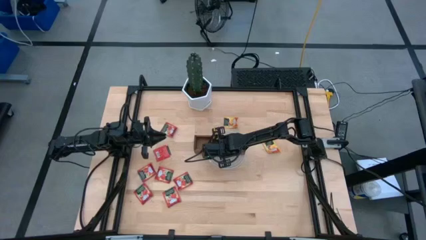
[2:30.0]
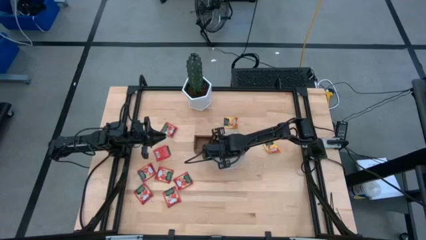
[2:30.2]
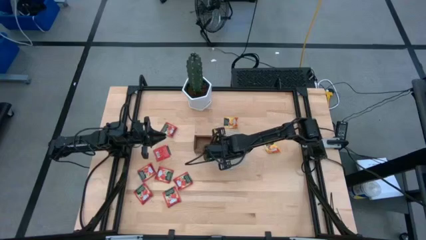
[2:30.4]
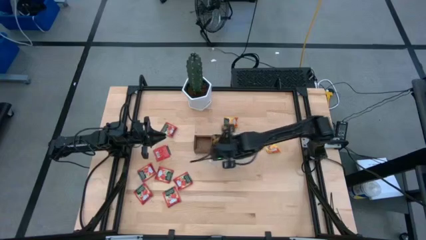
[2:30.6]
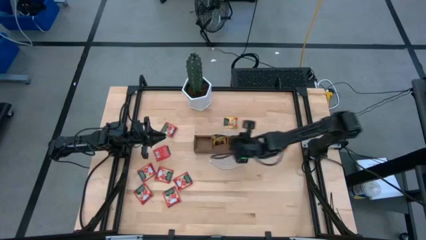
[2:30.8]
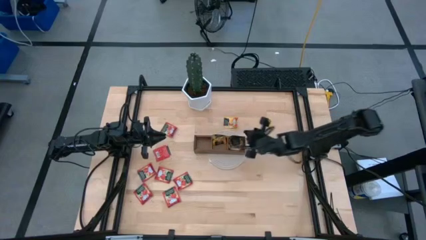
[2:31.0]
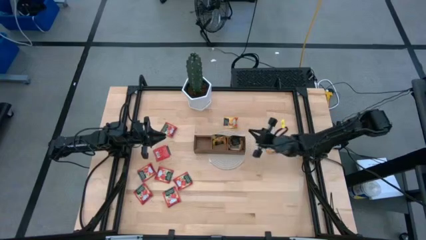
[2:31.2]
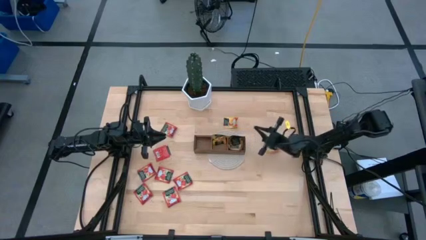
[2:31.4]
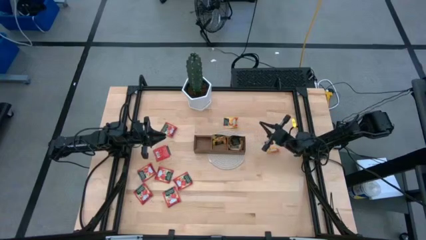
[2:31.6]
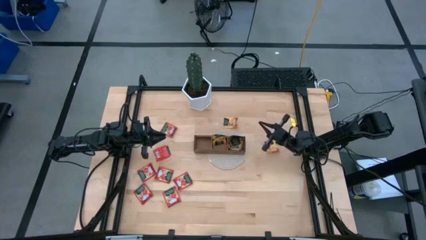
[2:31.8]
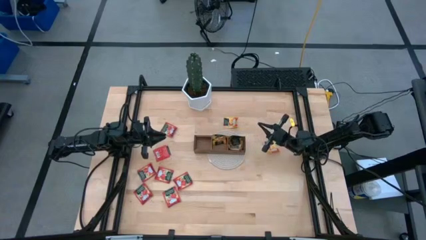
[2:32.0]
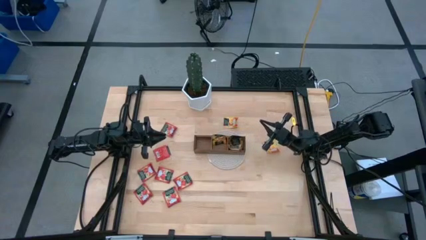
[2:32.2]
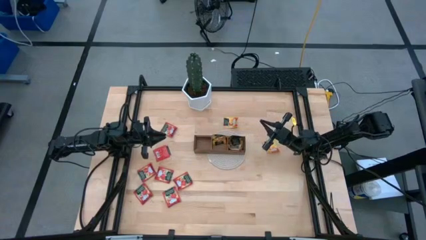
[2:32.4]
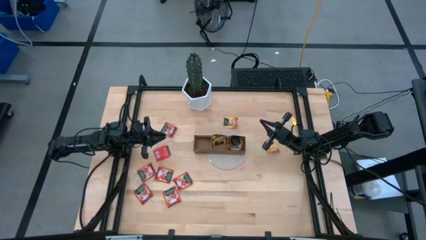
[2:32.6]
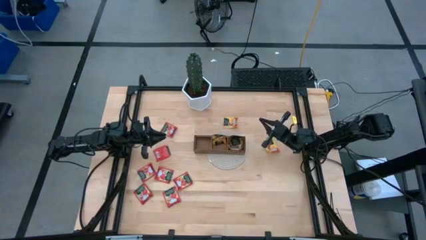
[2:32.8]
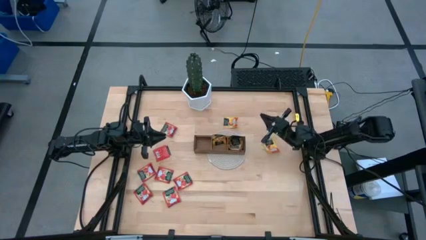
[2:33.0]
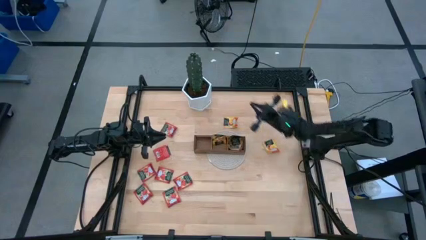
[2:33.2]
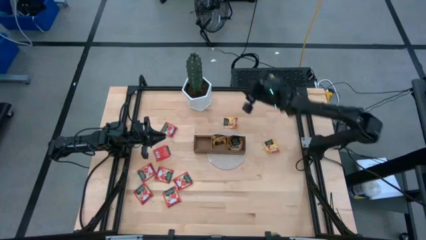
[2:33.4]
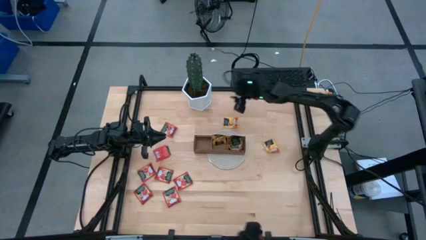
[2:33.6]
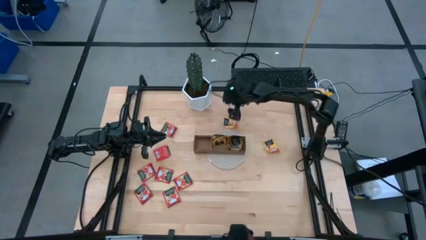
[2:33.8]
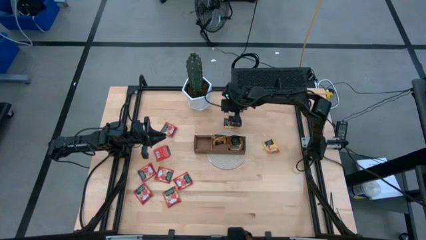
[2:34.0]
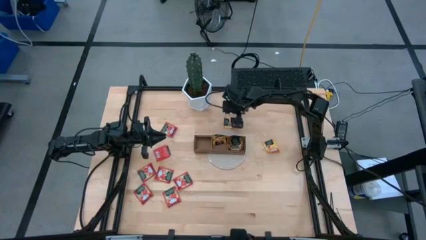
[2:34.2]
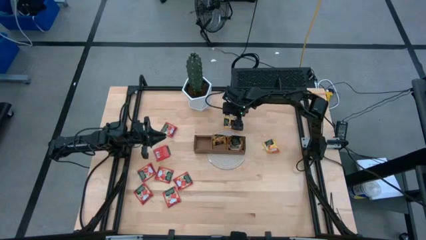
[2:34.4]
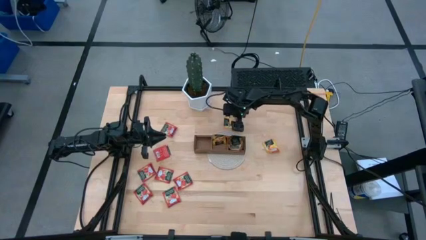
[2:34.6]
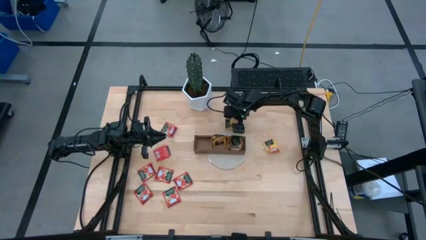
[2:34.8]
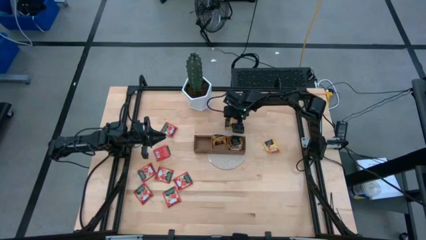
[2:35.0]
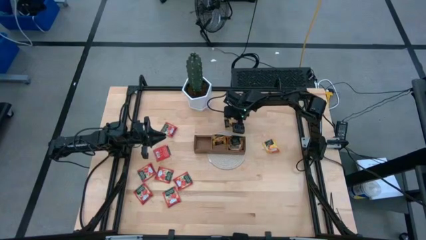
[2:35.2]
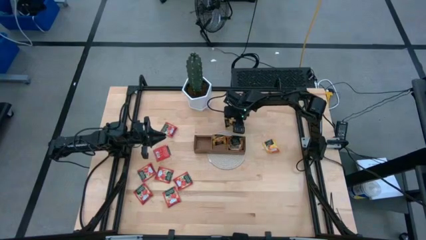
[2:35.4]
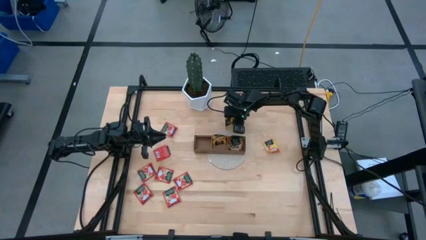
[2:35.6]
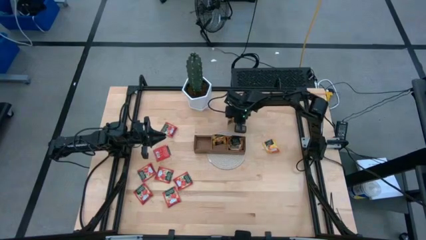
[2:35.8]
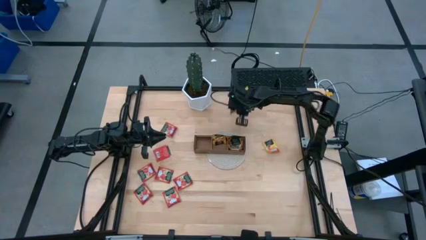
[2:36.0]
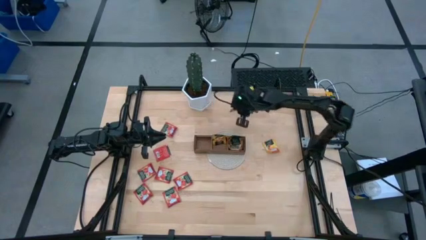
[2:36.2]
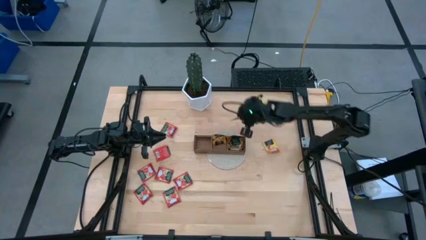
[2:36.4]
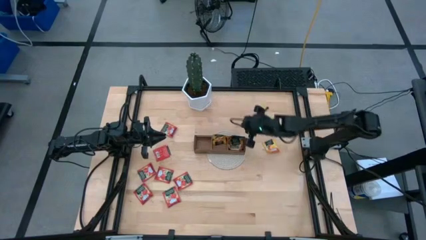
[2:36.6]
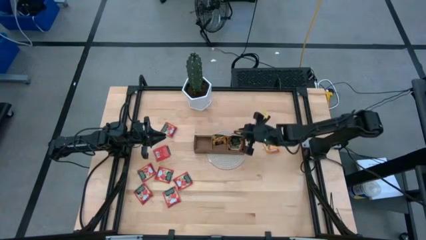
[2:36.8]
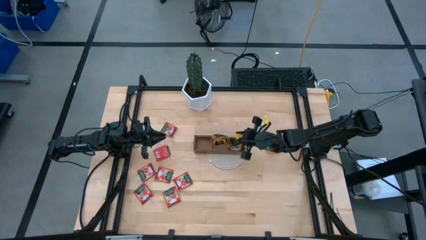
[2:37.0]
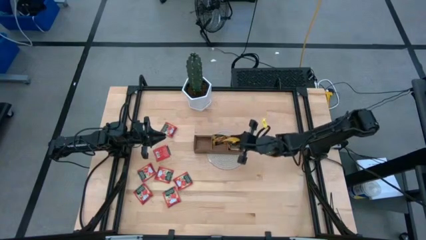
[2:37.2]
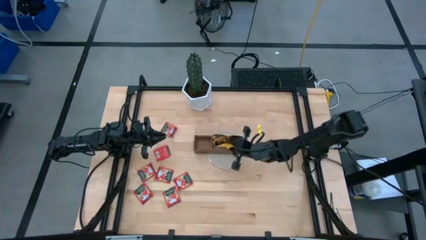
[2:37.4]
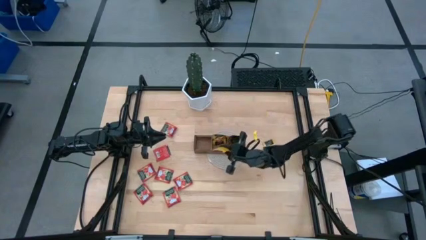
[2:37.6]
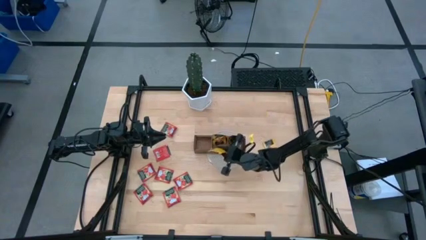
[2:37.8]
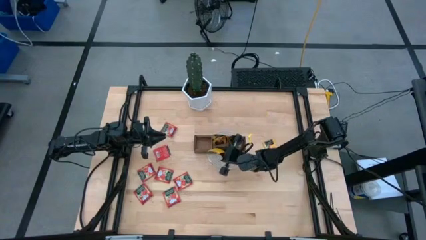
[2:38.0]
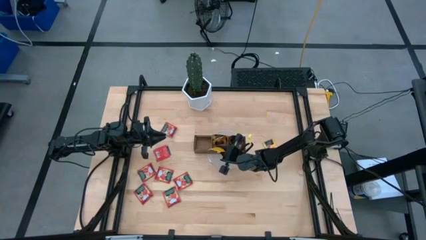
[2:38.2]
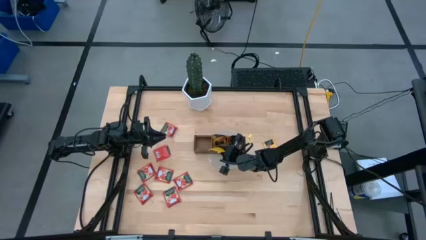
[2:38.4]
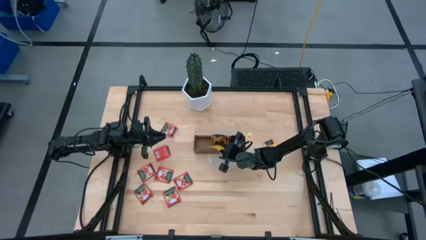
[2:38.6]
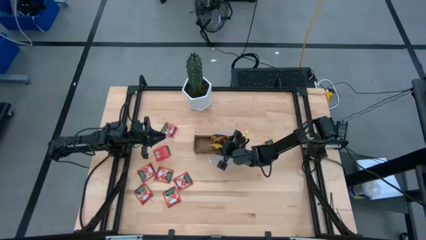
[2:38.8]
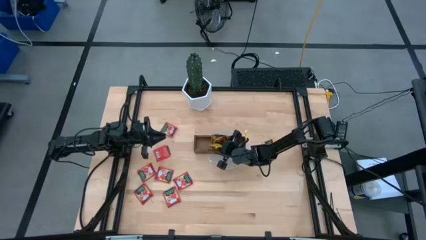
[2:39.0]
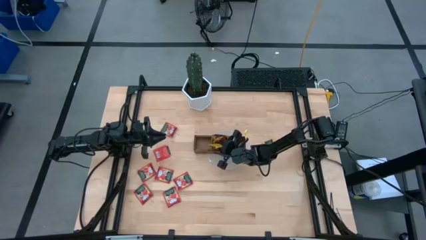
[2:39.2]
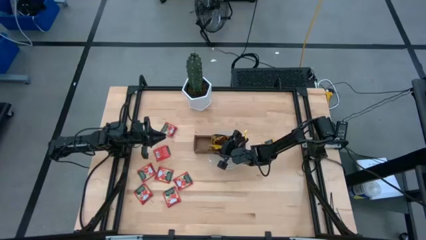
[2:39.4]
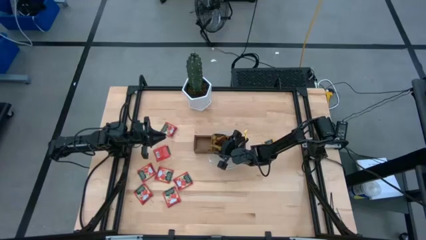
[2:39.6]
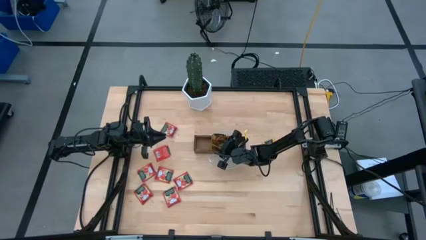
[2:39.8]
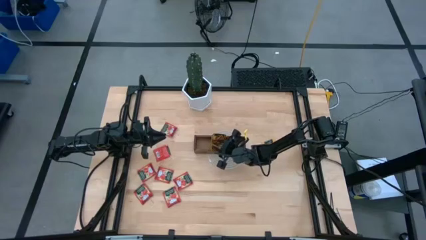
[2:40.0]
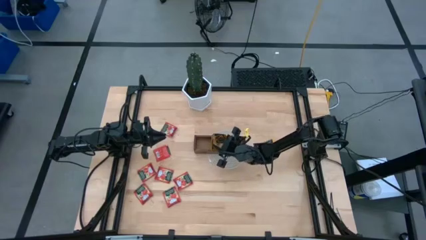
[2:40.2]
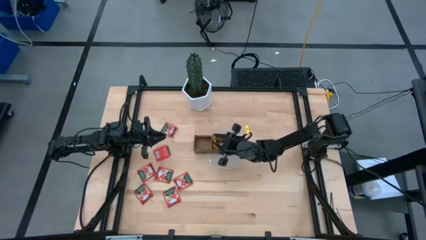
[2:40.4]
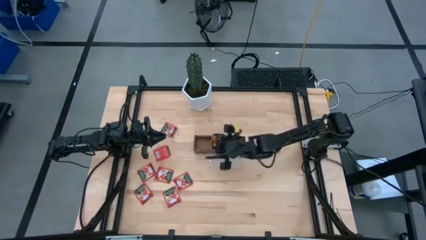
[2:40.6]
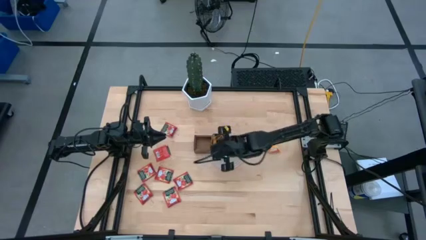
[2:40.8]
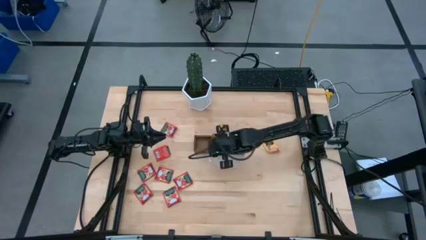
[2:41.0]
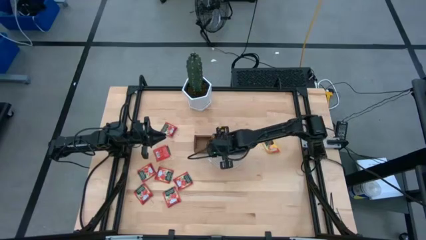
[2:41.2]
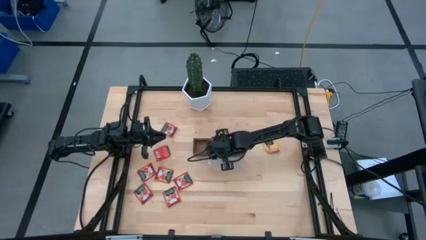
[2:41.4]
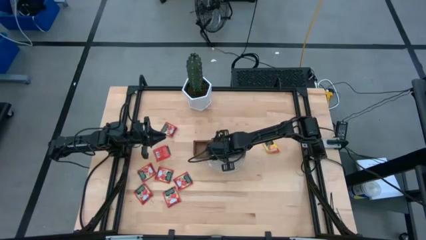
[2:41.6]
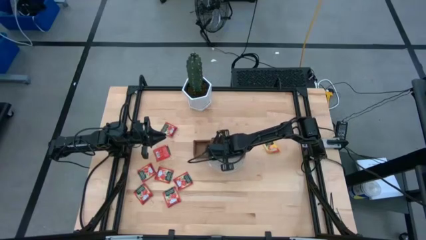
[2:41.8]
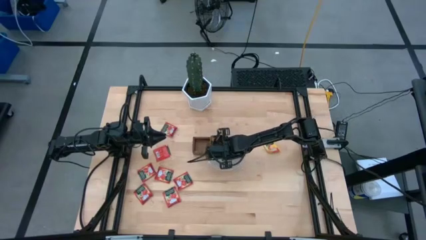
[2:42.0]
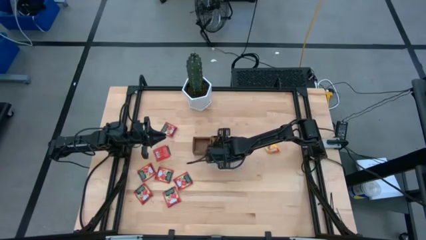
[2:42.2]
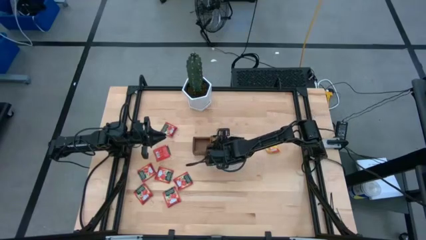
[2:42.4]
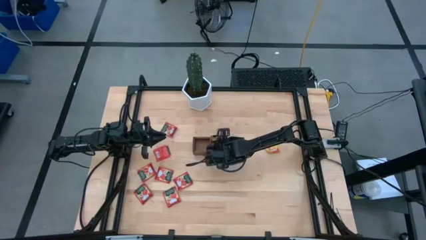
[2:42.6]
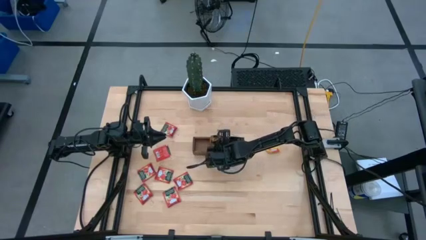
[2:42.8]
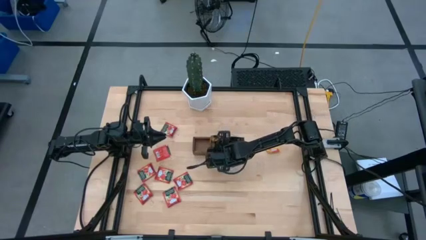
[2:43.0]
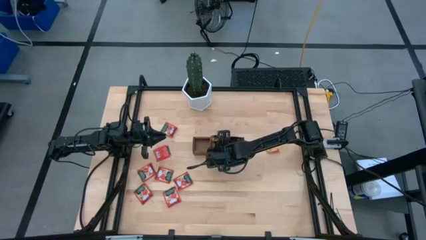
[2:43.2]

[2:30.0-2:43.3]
Task: Pick & Place Tea
Put the orange tea bag into the middle section of the wooden organizer

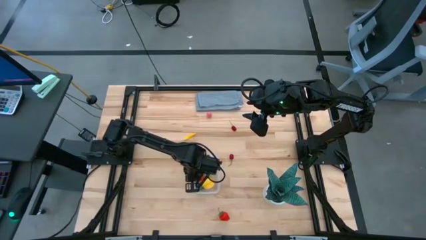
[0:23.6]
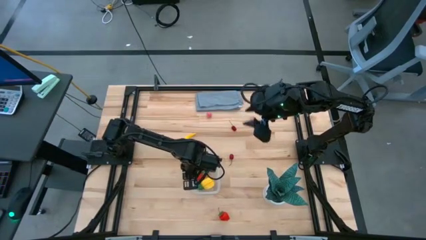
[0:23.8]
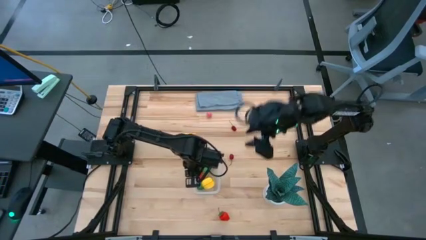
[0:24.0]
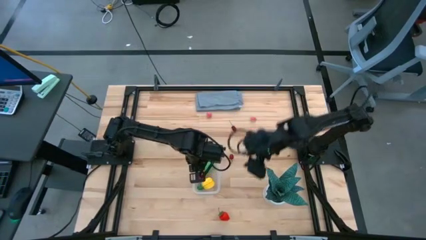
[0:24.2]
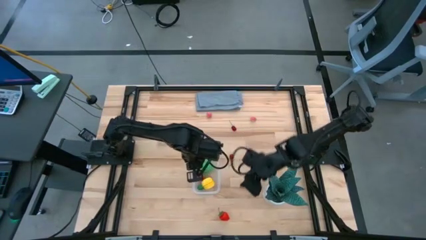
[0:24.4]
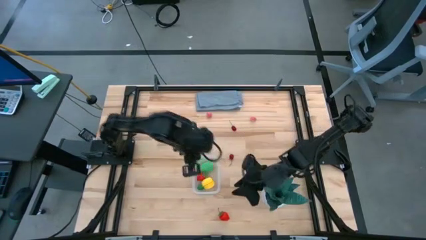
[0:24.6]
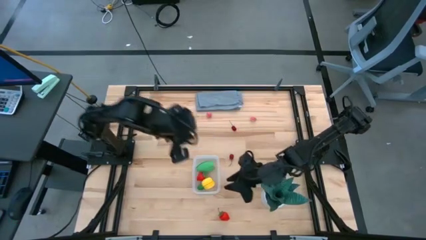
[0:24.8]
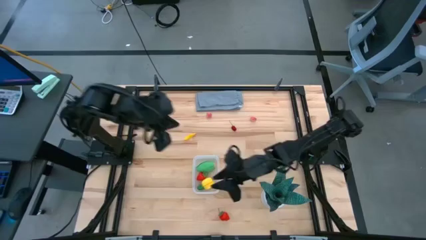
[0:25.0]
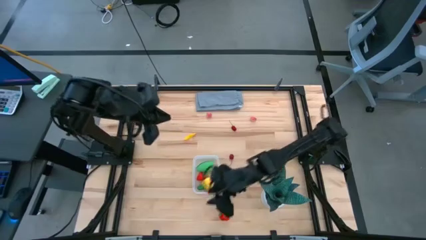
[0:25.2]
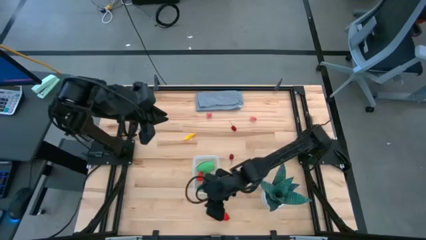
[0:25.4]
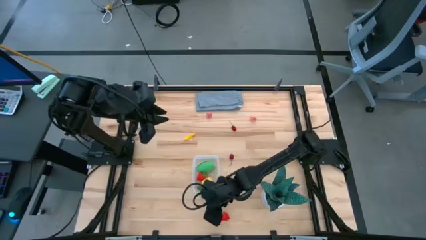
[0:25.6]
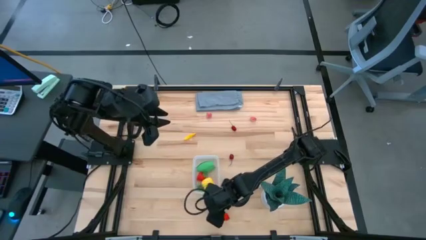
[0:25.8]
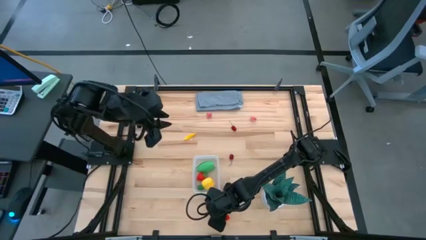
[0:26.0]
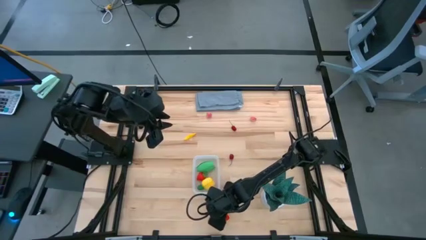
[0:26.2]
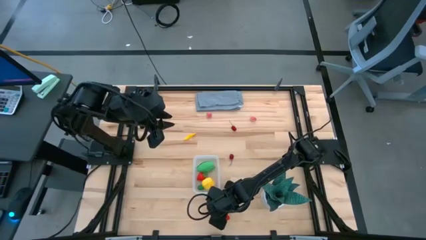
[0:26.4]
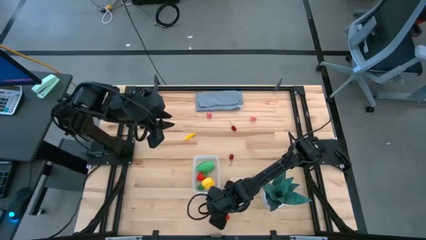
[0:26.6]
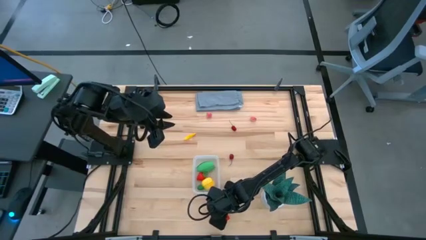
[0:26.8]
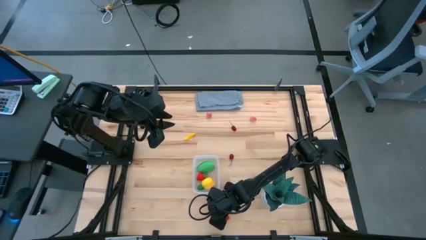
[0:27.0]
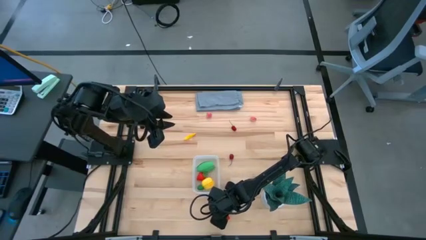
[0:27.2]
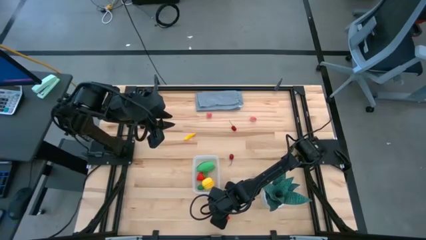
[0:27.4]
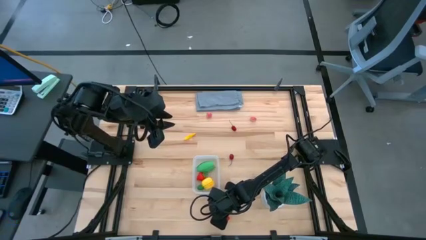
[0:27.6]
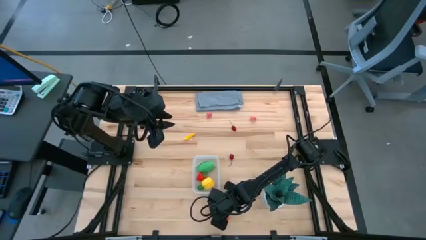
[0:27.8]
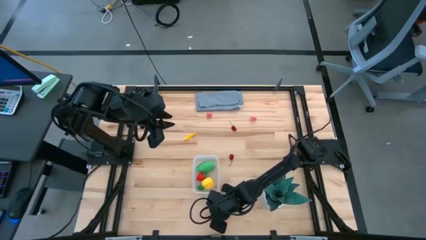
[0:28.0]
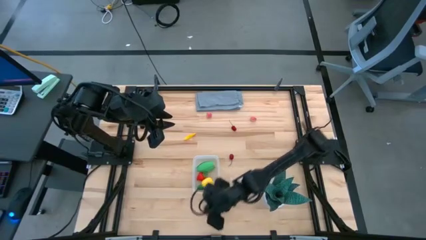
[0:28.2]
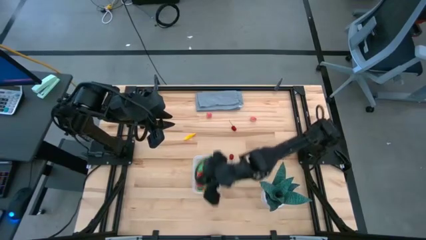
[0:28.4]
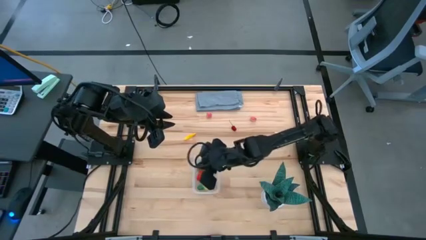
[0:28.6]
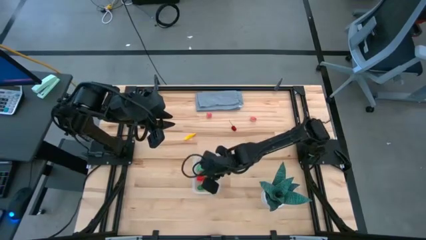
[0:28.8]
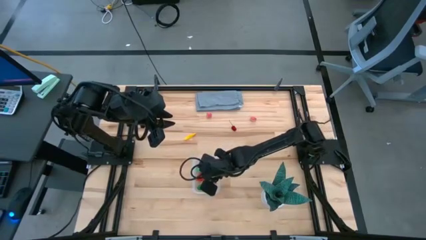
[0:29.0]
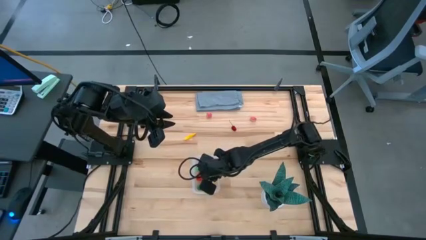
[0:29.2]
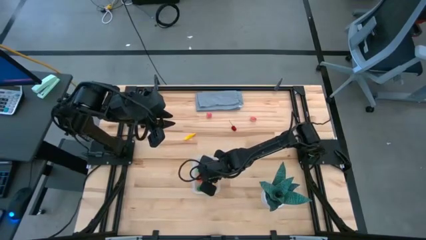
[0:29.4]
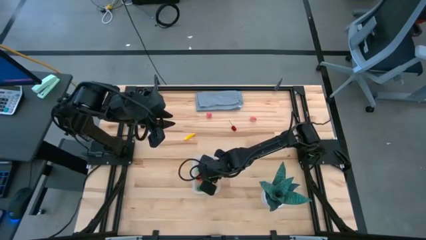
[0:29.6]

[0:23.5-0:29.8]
Task: Pick and placing Produce into tupperware
Put the strawberry into the transparent bin
